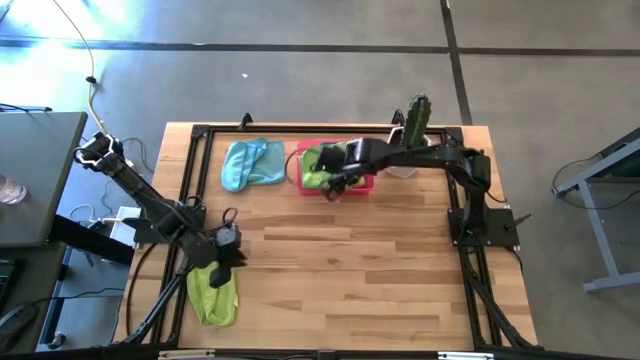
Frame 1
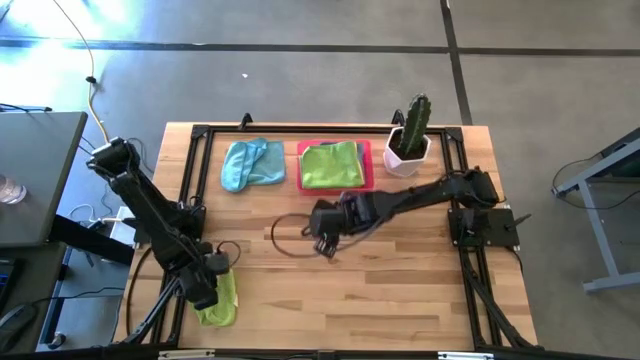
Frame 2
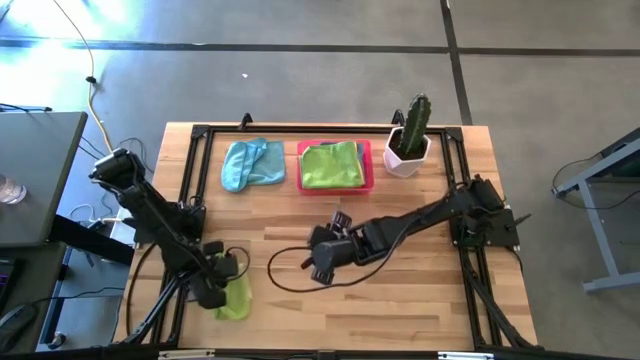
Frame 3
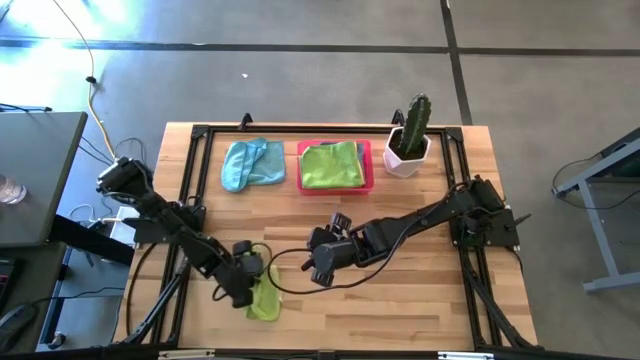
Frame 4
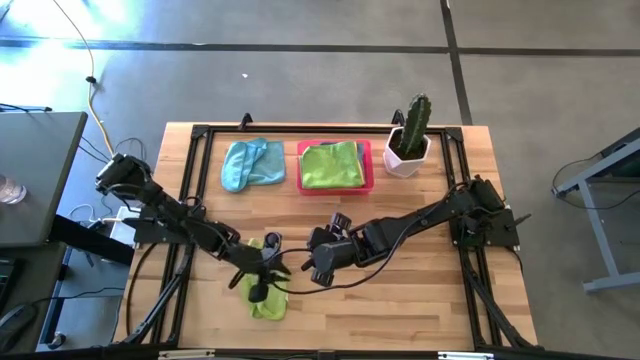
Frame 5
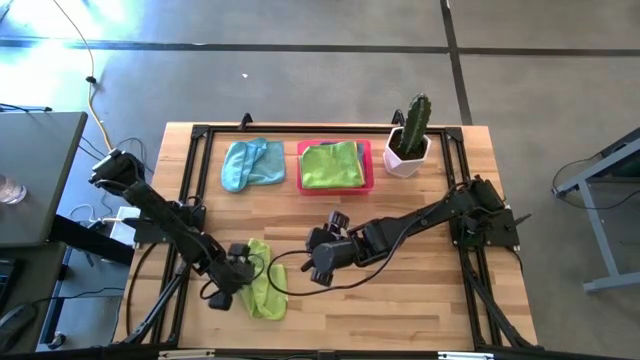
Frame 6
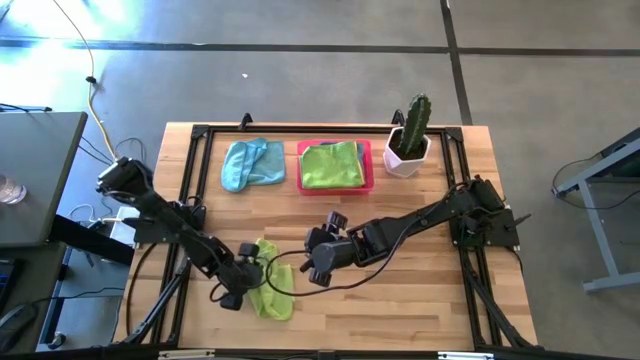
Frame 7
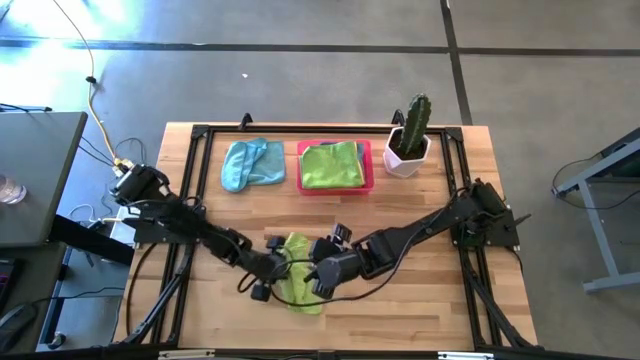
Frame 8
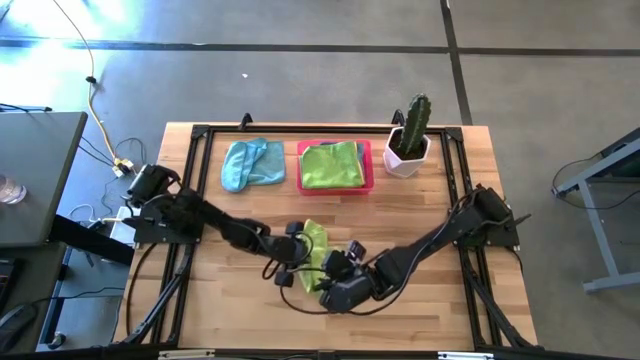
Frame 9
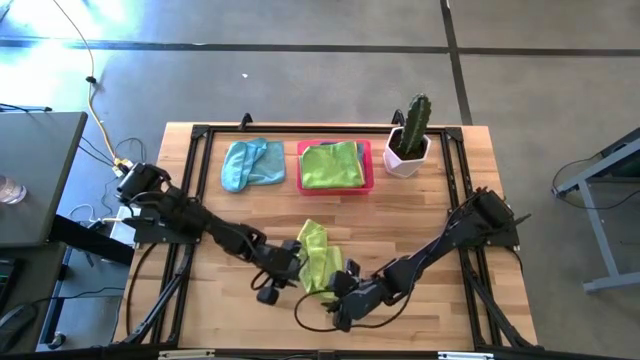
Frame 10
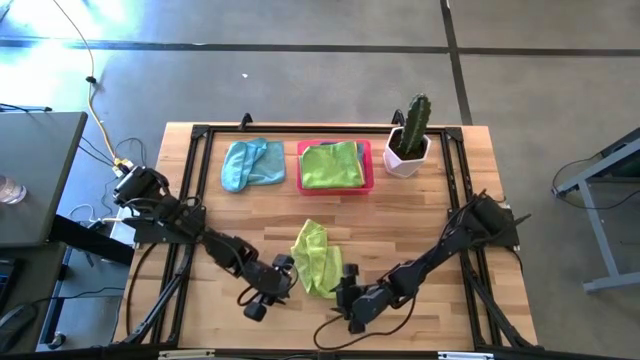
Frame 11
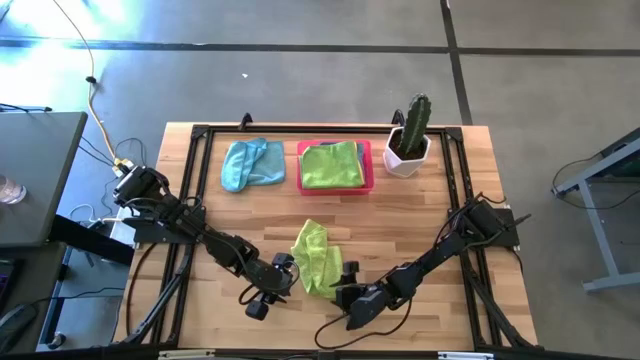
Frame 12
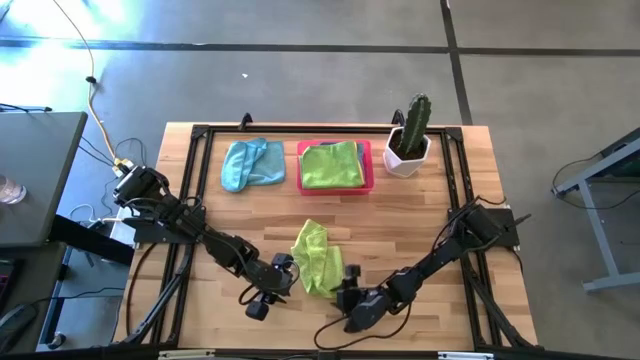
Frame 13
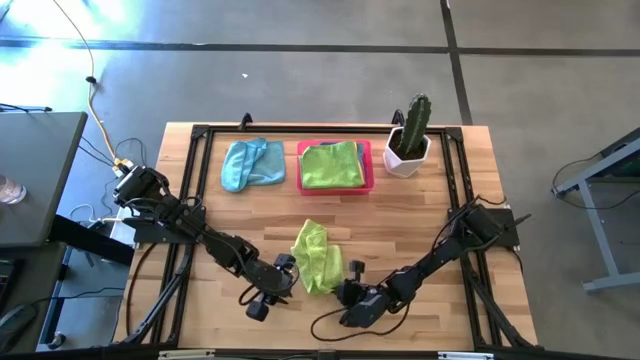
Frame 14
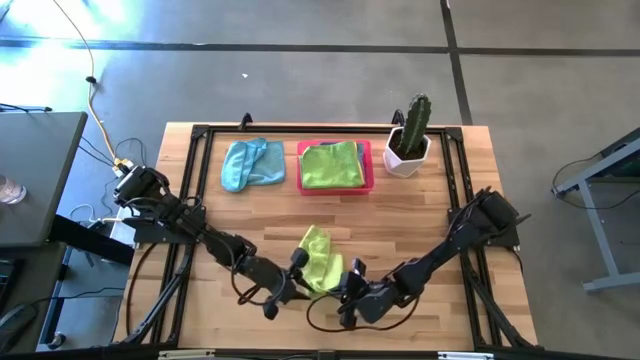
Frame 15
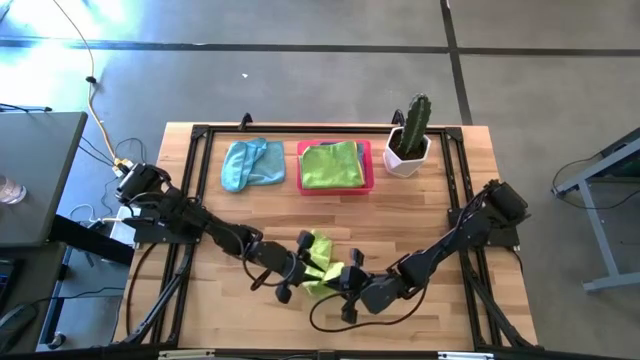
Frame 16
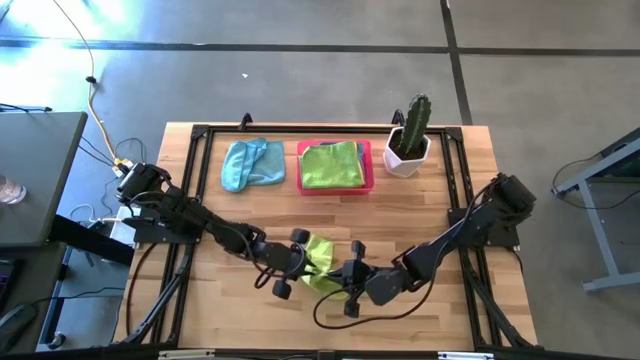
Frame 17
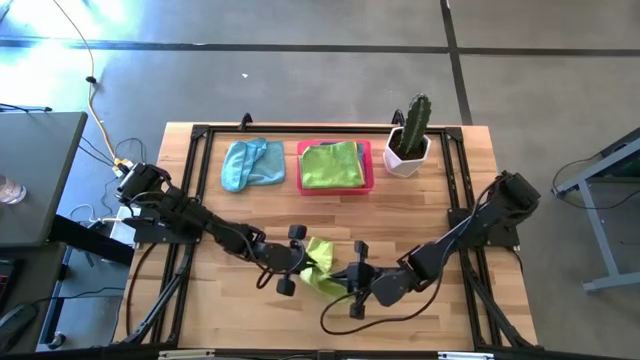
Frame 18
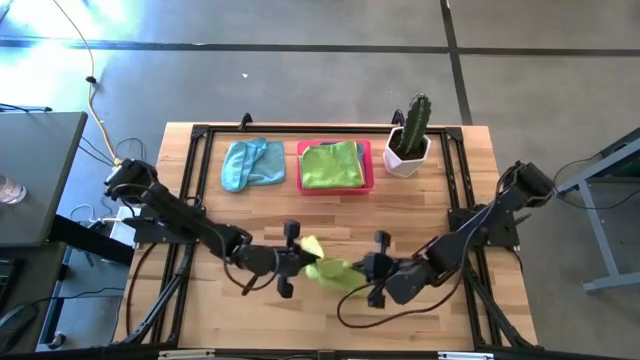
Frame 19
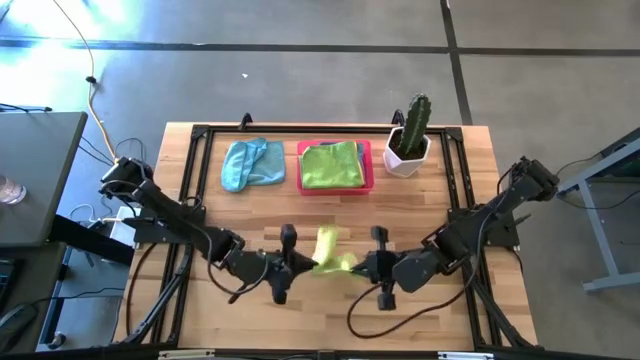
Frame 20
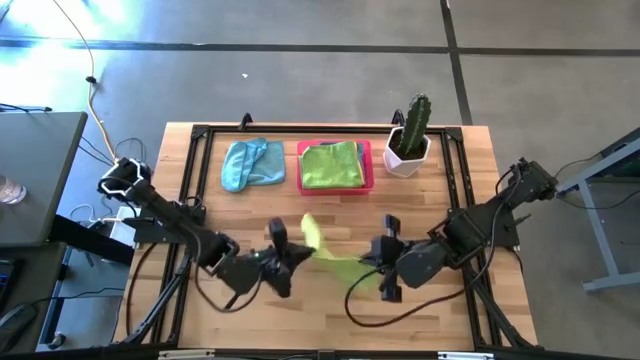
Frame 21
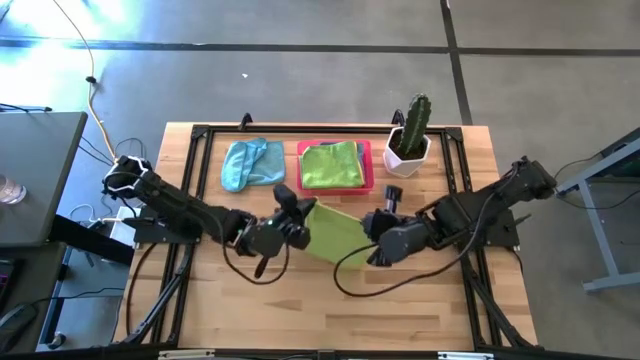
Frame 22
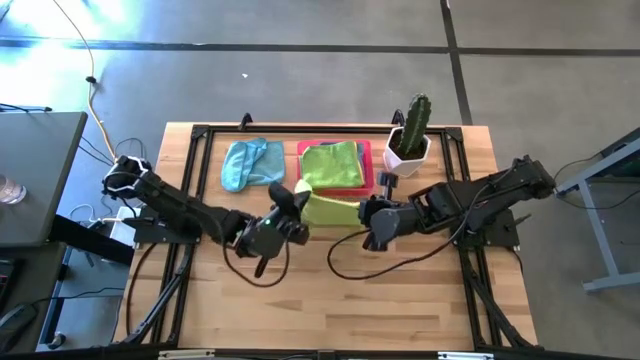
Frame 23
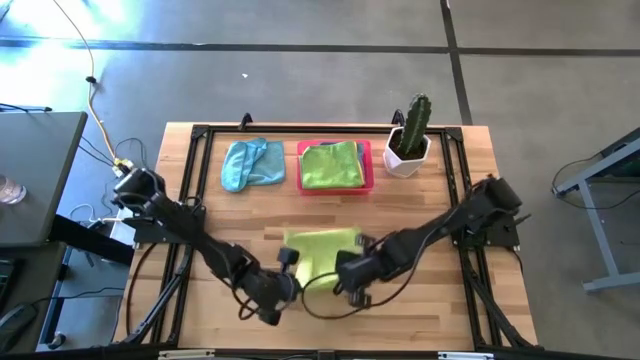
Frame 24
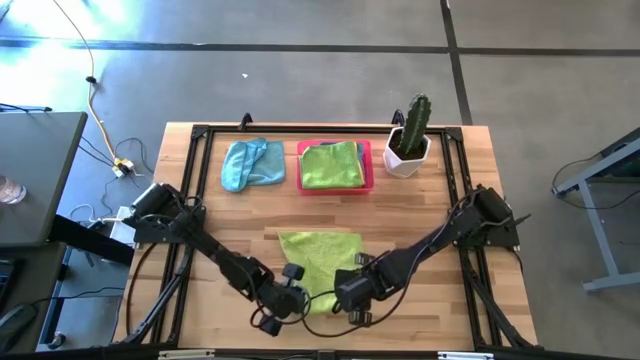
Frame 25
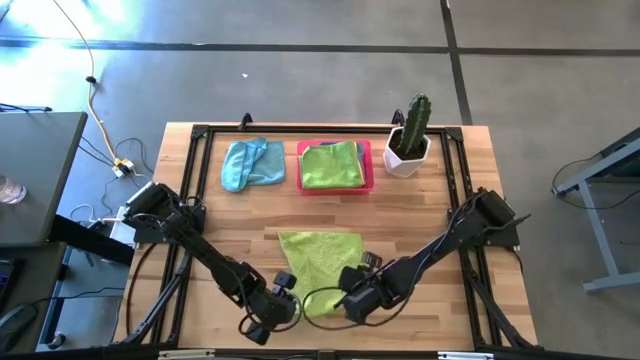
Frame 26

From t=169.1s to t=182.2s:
Task: Fold microfiber towels
Fold the light green microfiber cloth

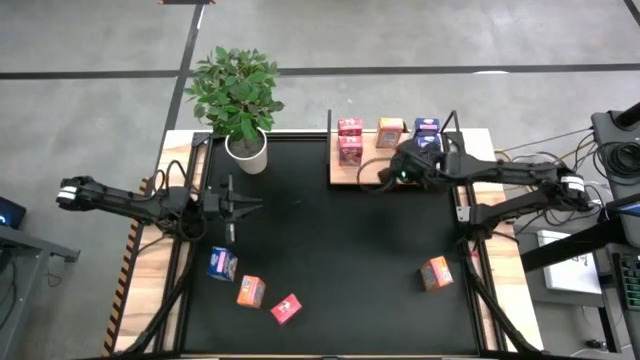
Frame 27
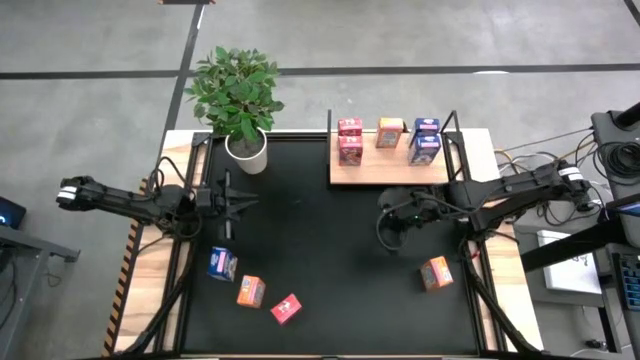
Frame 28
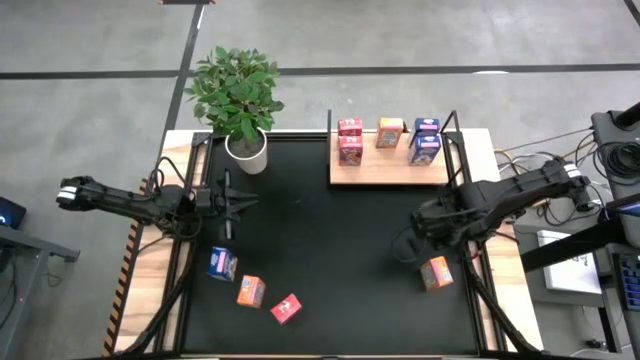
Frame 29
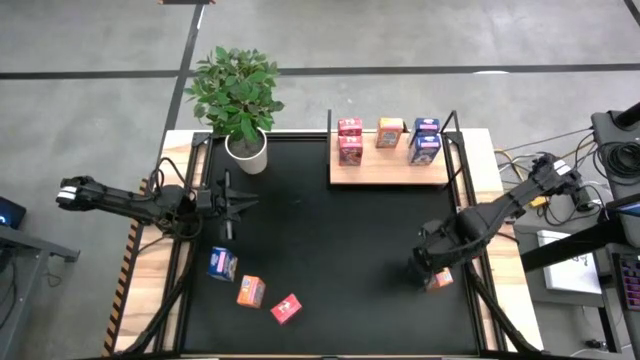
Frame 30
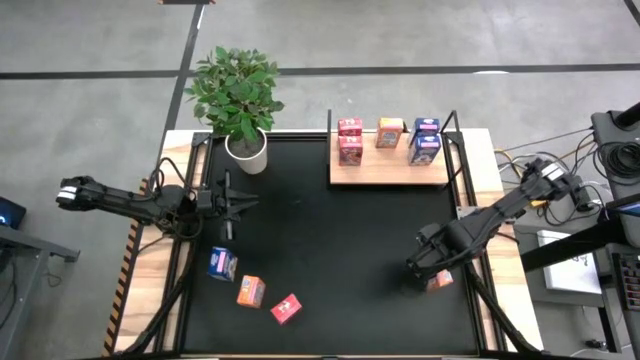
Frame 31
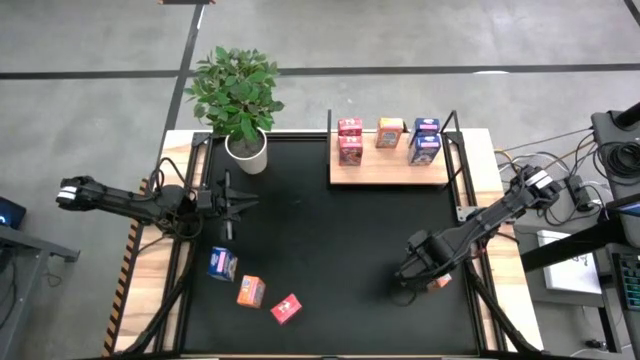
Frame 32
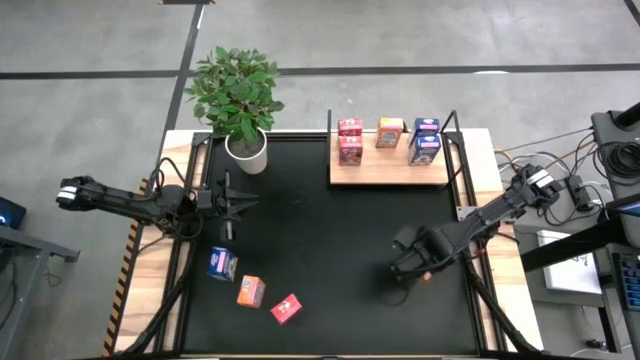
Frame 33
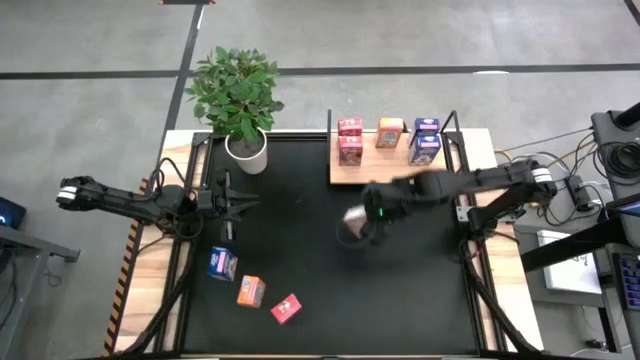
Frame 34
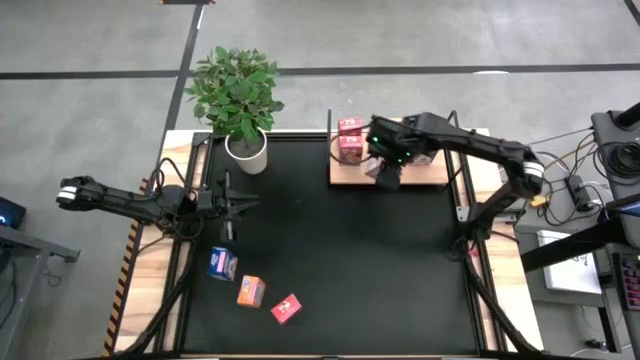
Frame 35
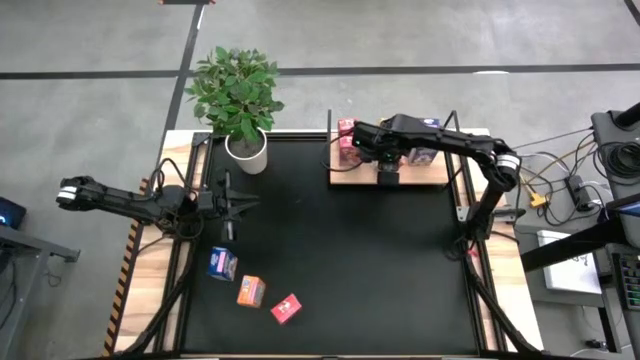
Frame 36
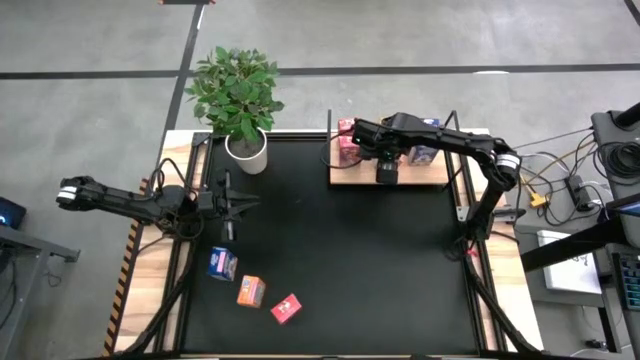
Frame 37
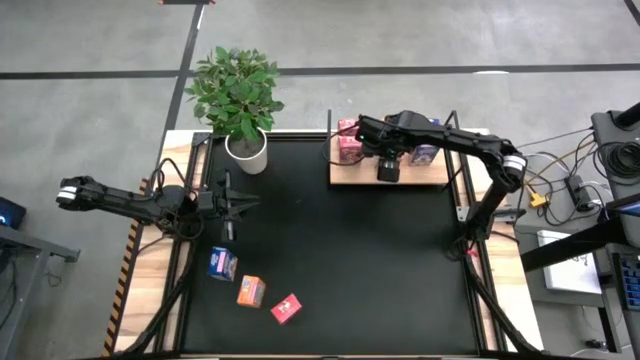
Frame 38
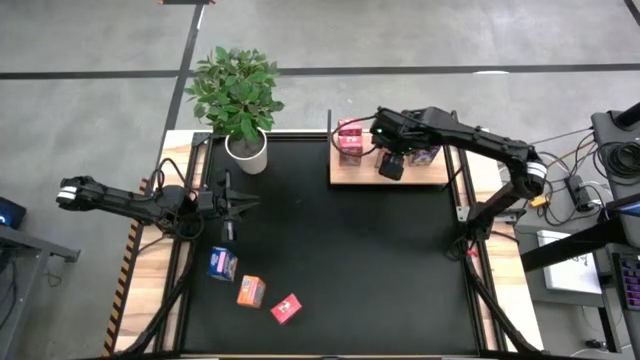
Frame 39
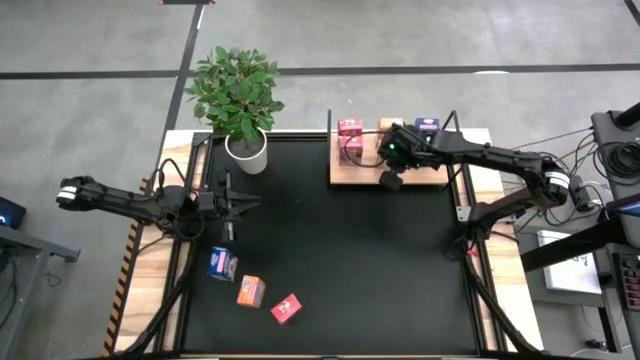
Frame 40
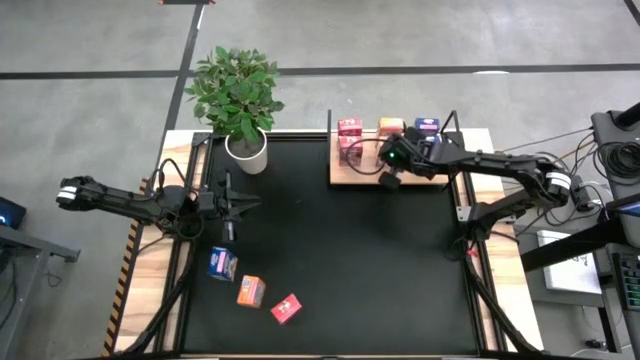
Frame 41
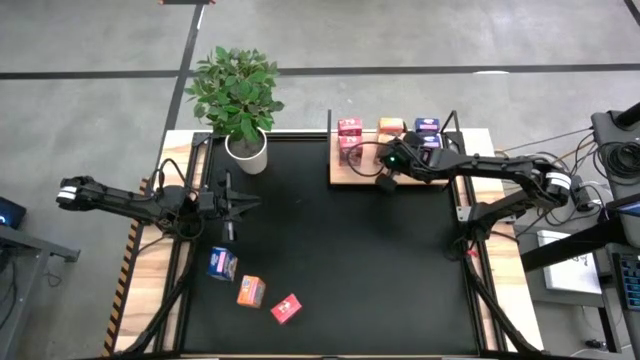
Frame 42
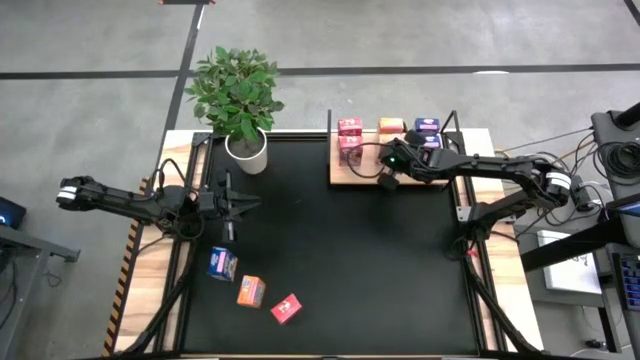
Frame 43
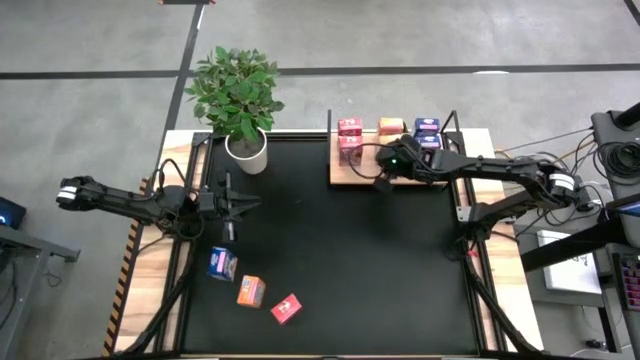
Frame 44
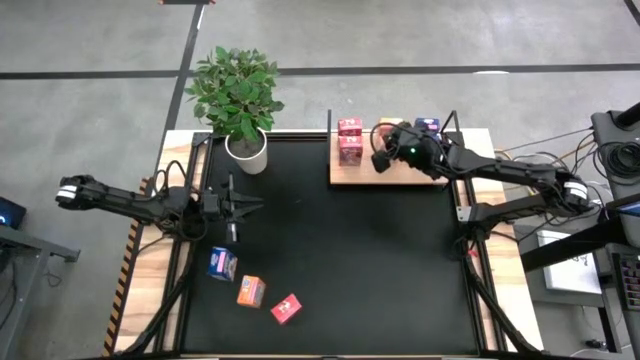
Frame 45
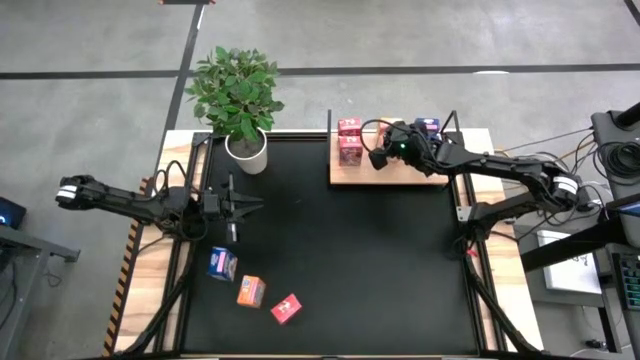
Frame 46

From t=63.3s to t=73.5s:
Task: Stack cereal on shelf
Put the right orange cereal box on the shelf aligned with the other orange cereal box
